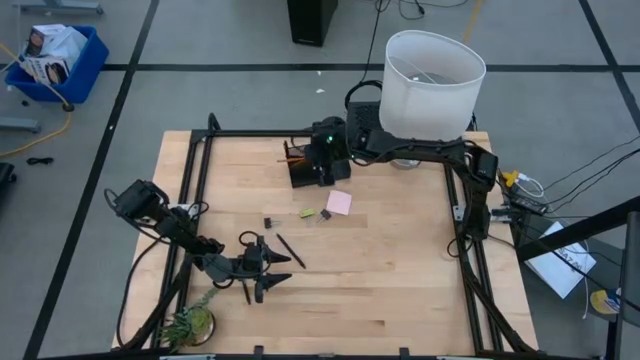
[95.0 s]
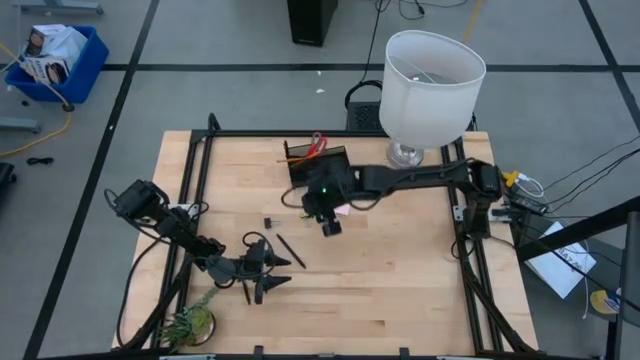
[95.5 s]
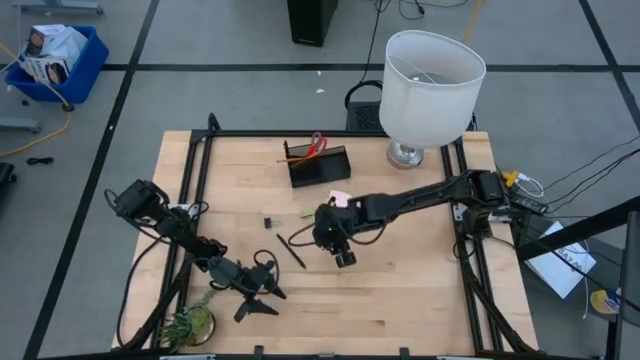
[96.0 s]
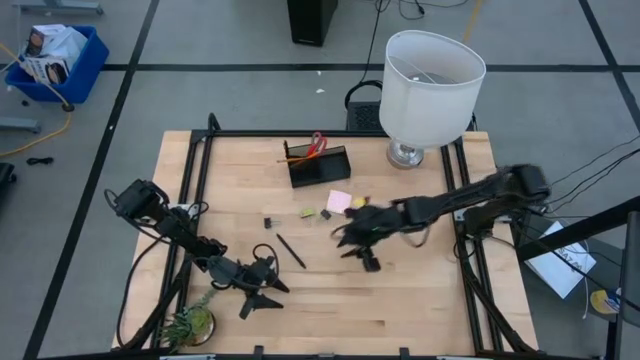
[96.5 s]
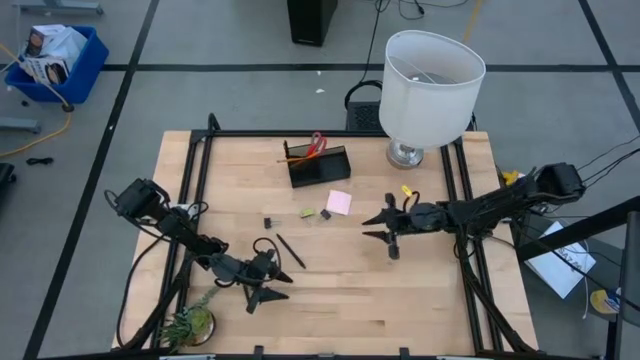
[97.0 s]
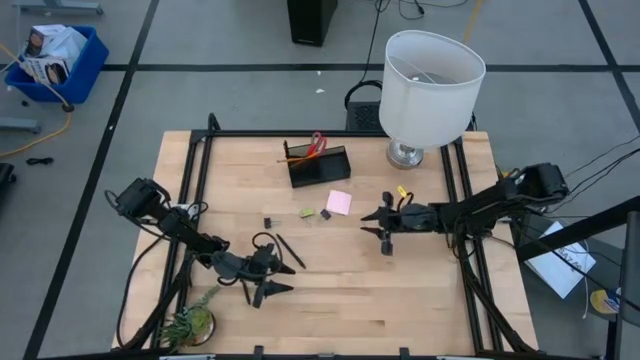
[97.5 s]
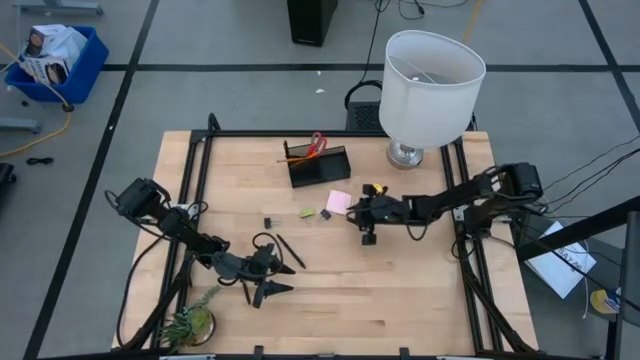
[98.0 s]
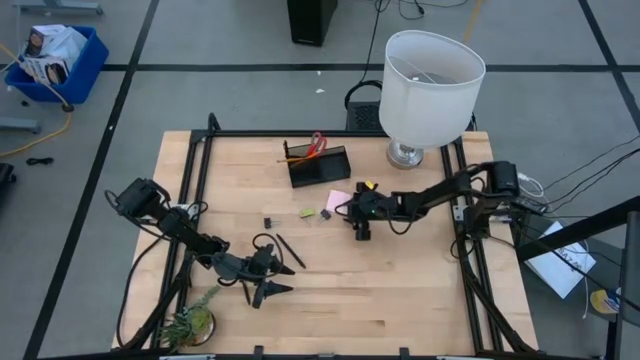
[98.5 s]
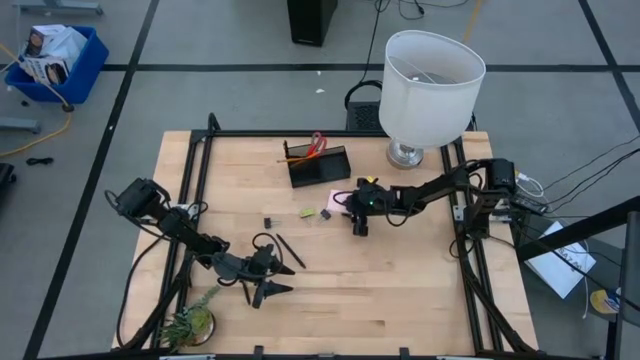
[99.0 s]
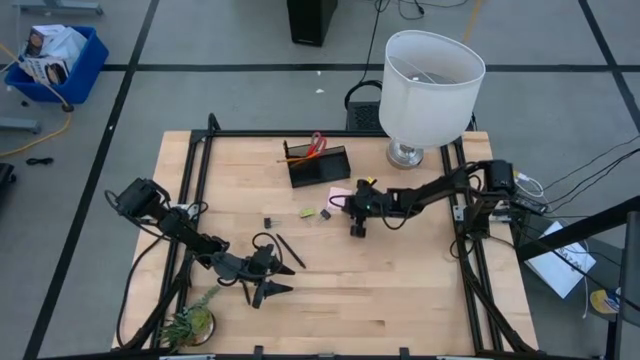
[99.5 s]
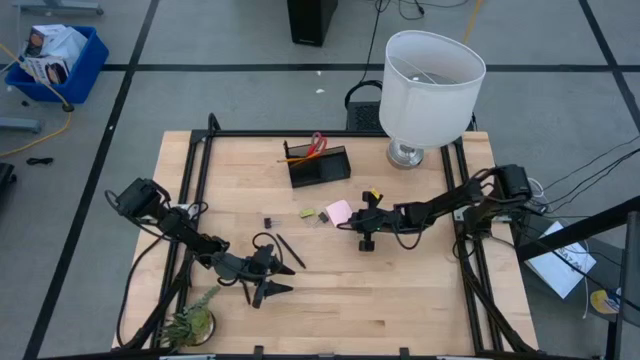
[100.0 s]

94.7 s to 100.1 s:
Task: Pick and place office supplies into organizer
Put the pink sticky notes into the black desk organizer

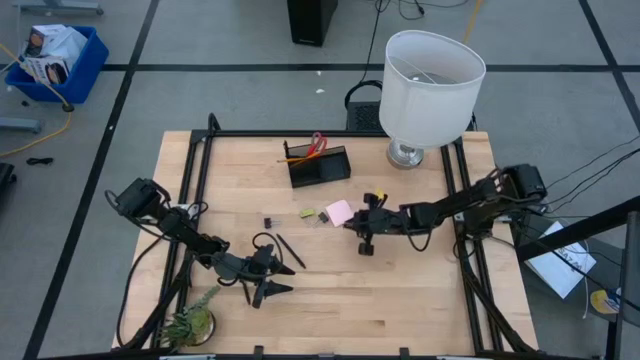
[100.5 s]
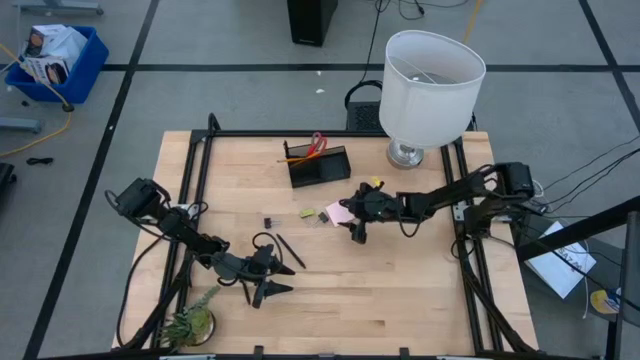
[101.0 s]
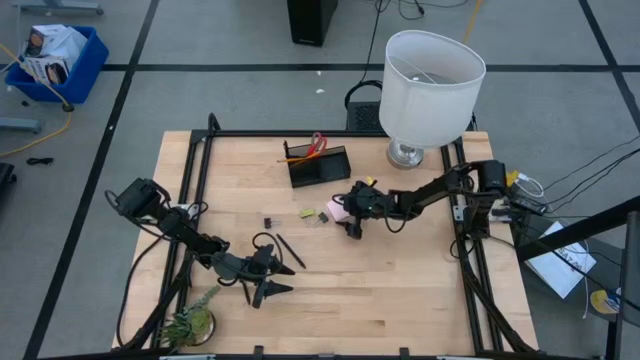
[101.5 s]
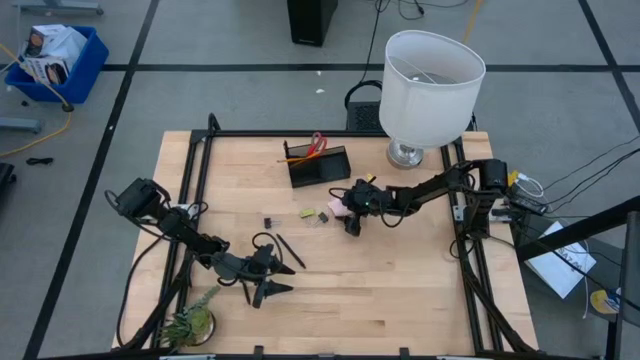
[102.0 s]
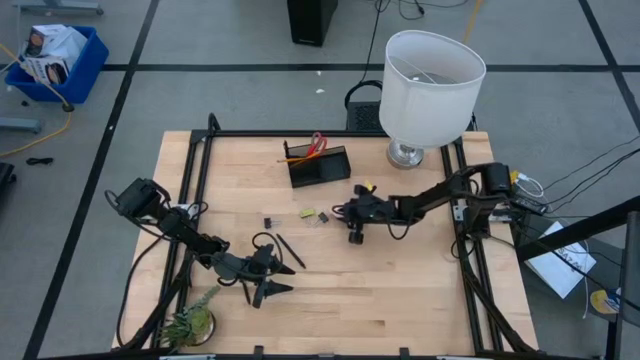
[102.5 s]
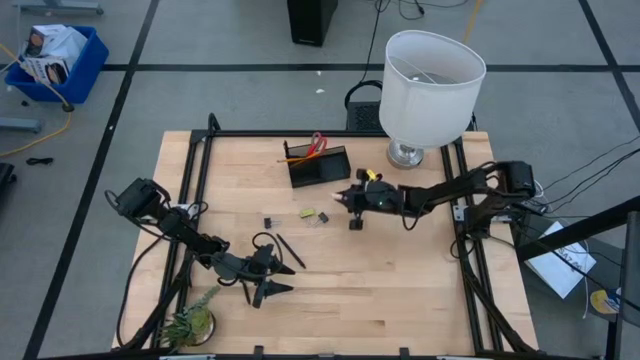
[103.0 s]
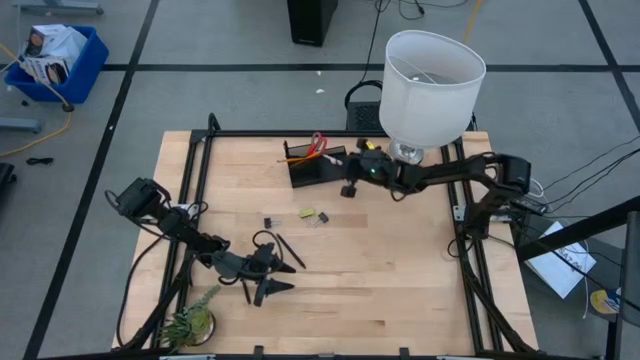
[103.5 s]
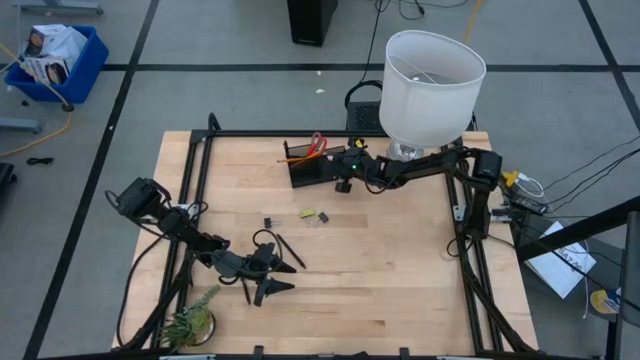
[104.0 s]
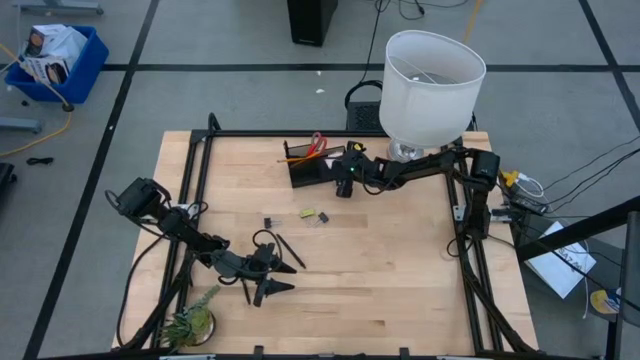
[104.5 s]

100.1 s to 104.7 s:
Put the pink sticky notes into the black desk organizer

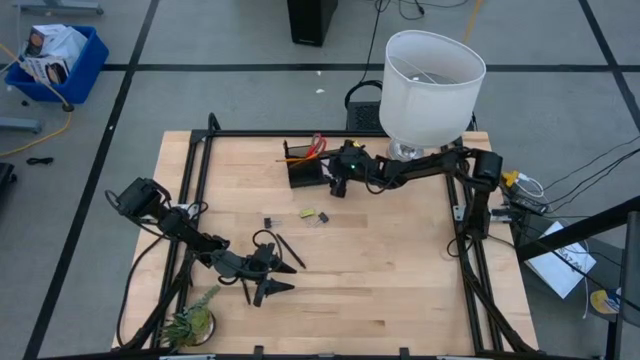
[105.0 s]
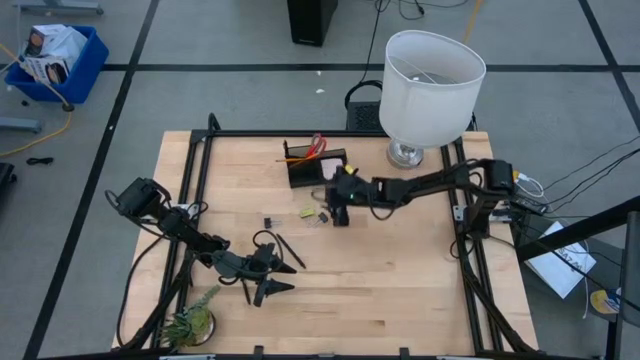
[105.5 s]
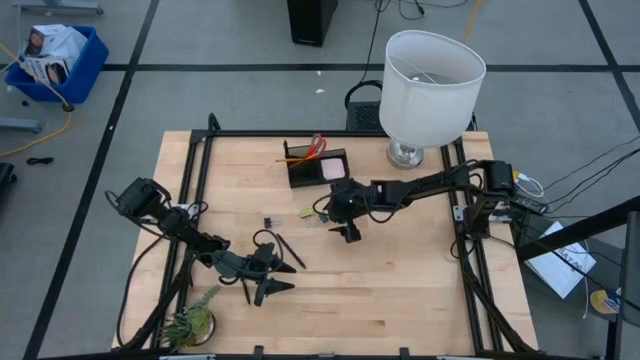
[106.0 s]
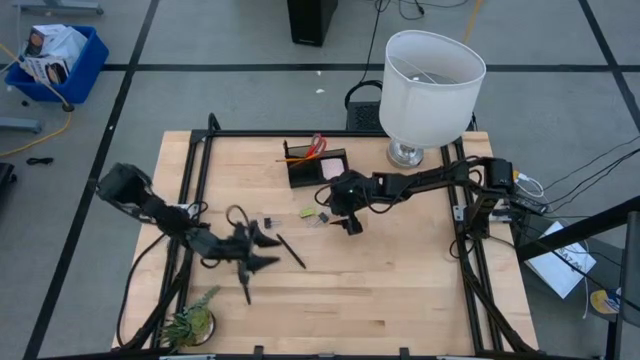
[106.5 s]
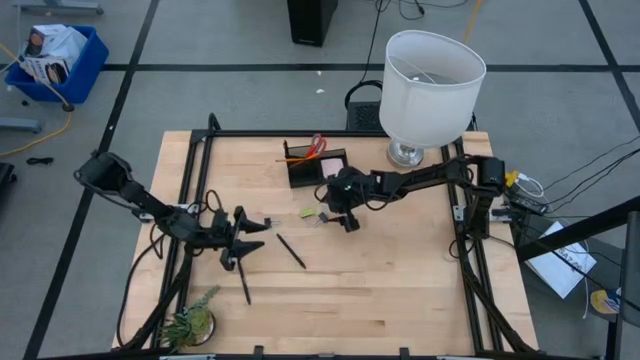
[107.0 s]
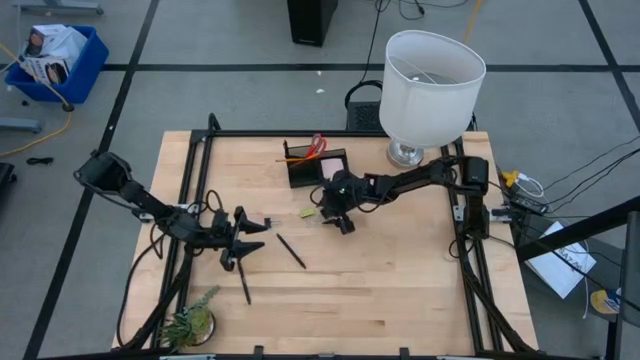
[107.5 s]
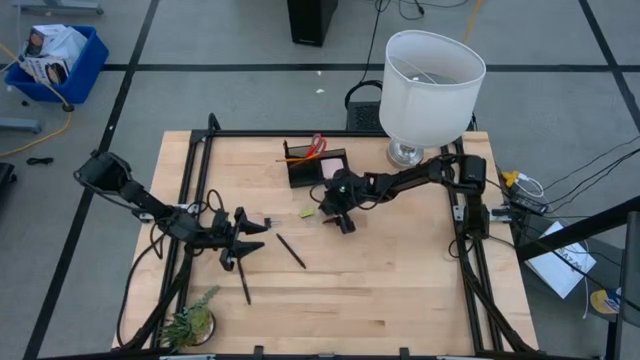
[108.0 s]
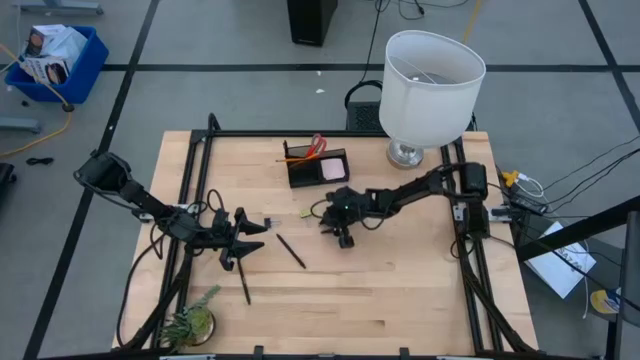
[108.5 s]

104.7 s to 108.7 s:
Put the black binder clip into the black desk organizer

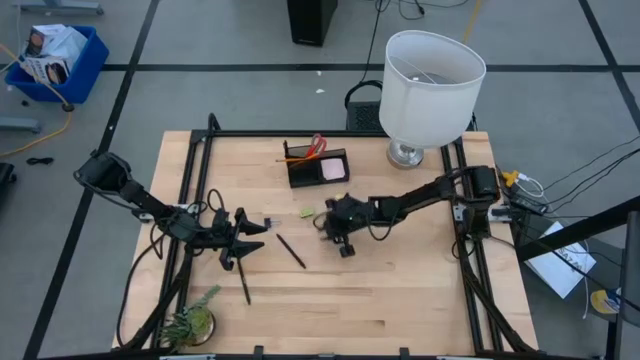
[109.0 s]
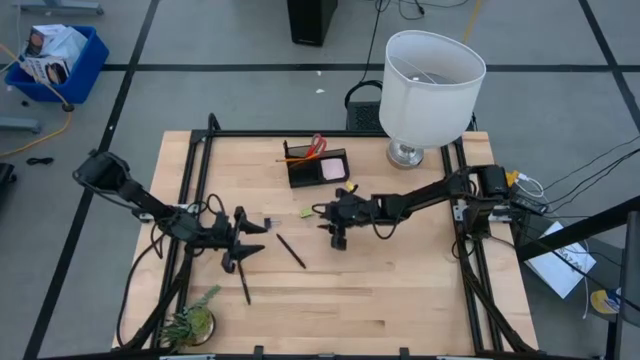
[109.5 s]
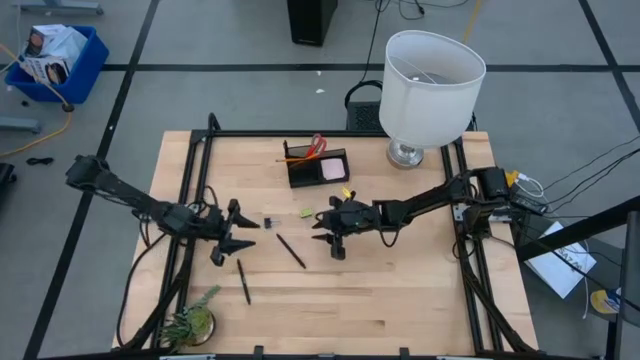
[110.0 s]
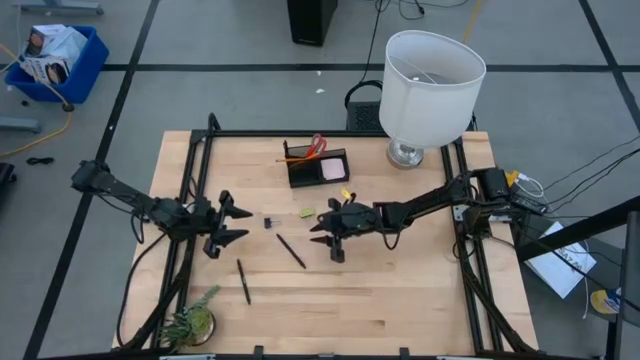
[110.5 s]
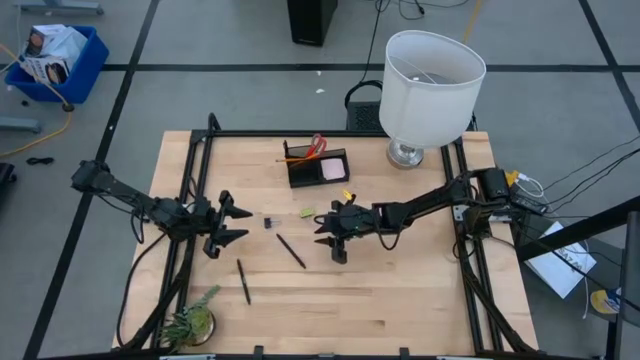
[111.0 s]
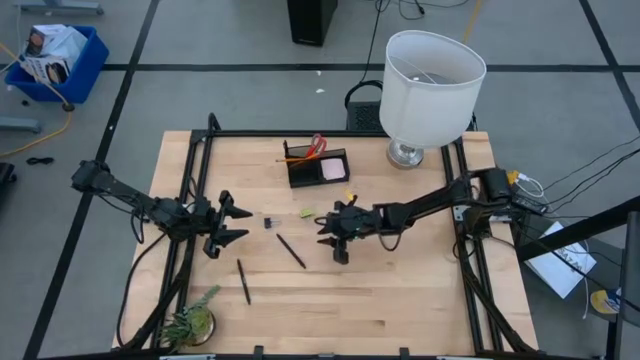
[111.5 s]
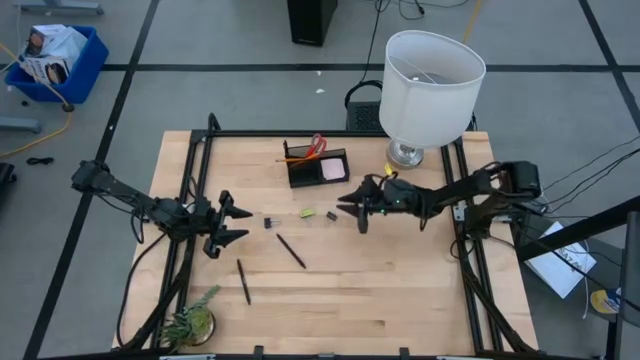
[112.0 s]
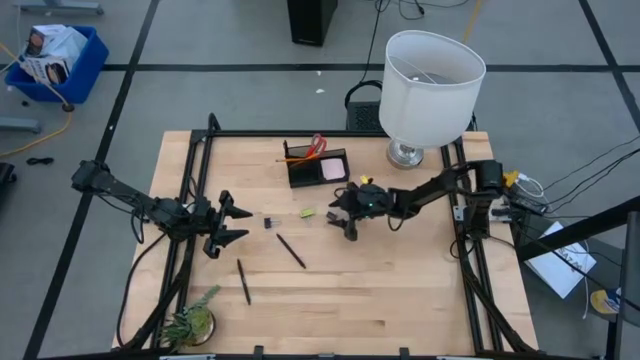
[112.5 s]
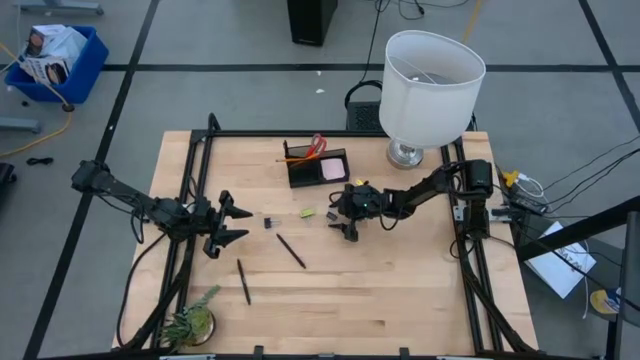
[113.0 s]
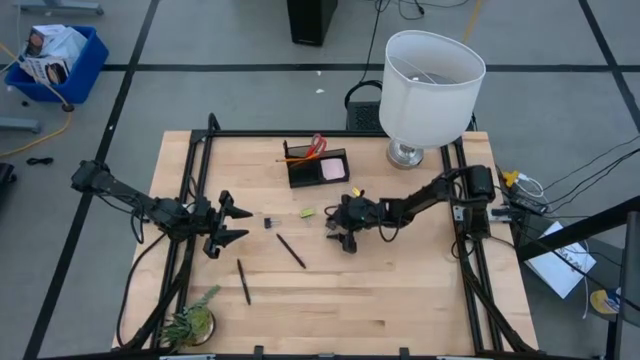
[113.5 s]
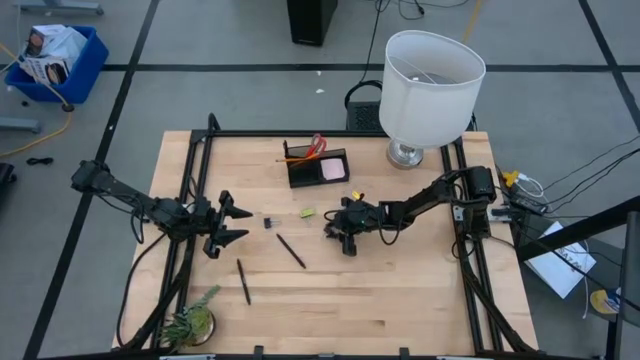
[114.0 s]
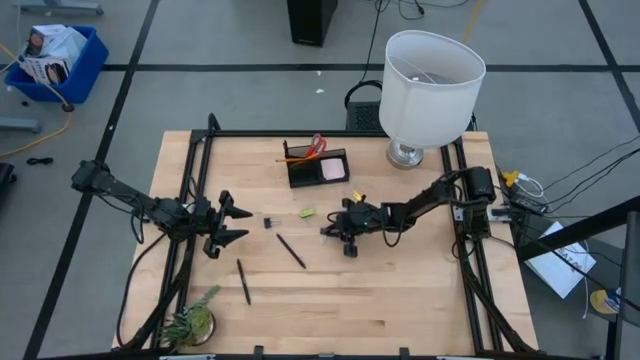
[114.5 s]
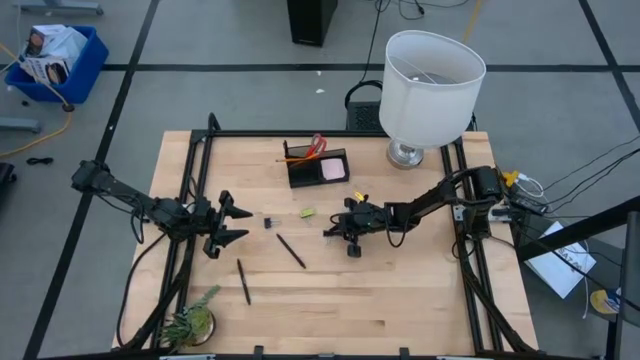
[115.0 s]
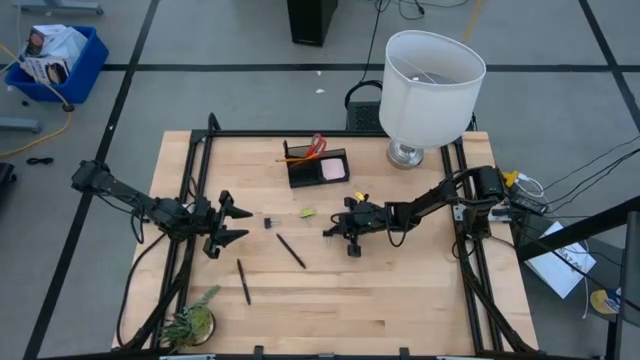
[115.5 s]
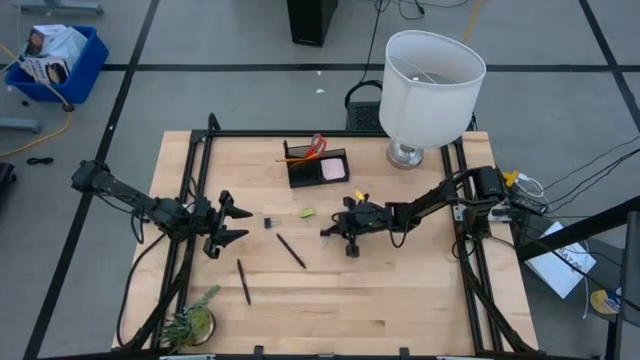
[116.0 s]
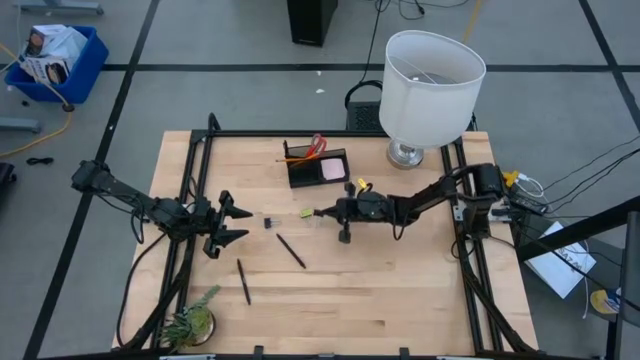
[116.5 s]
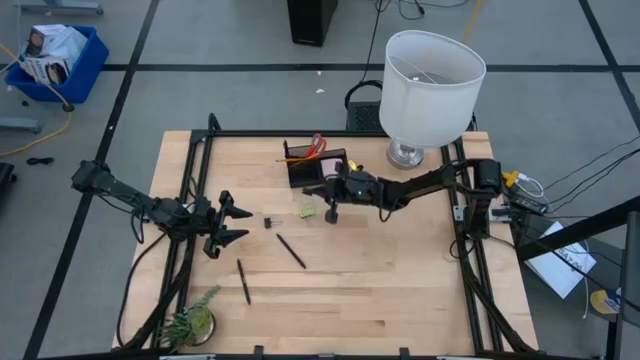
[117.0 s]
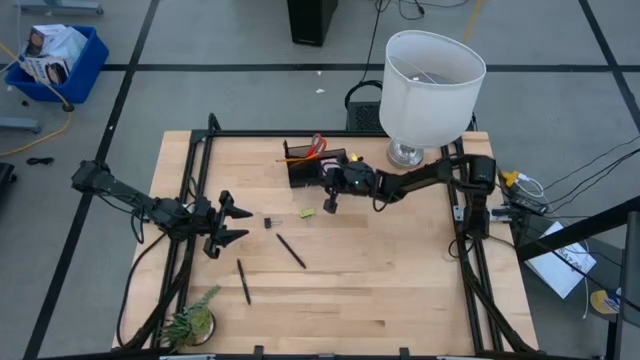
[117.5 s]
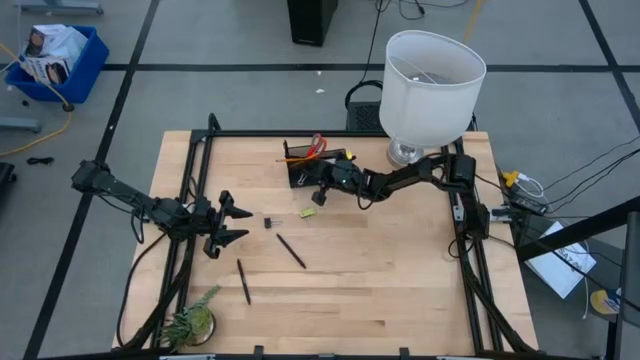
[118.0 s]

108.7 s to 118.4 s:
Put the black binder clip into the black desk organizer
